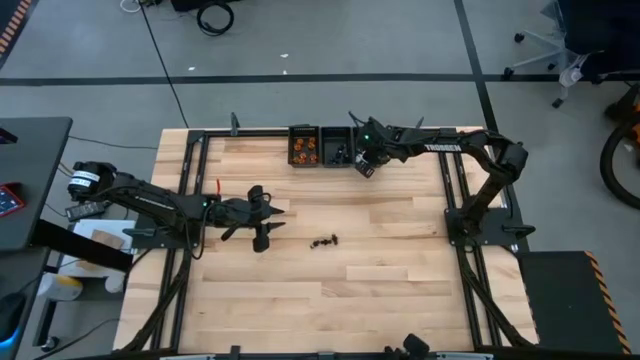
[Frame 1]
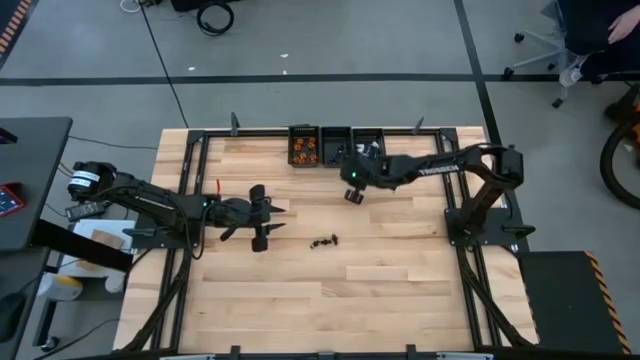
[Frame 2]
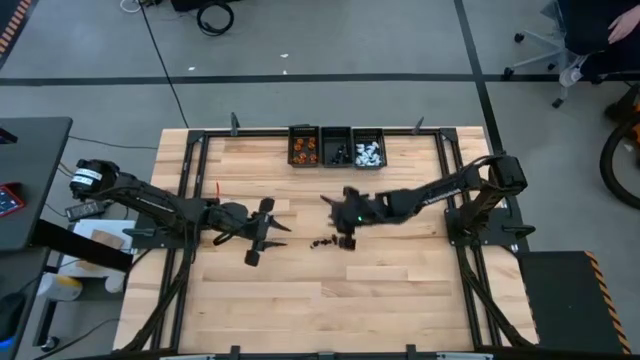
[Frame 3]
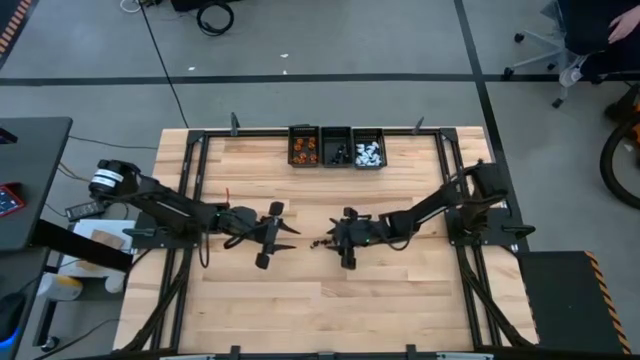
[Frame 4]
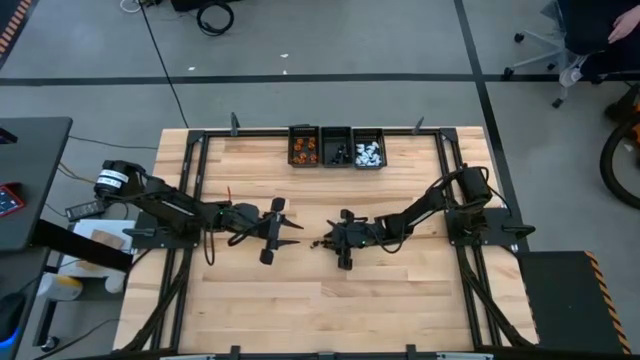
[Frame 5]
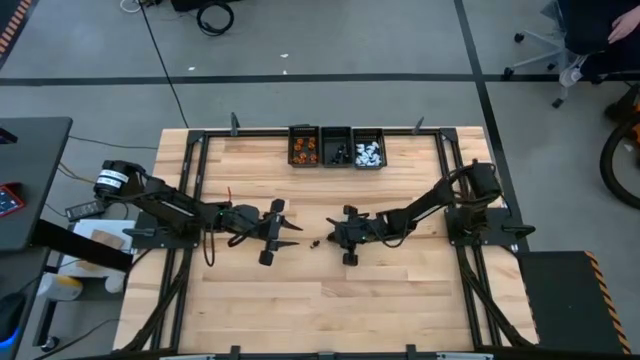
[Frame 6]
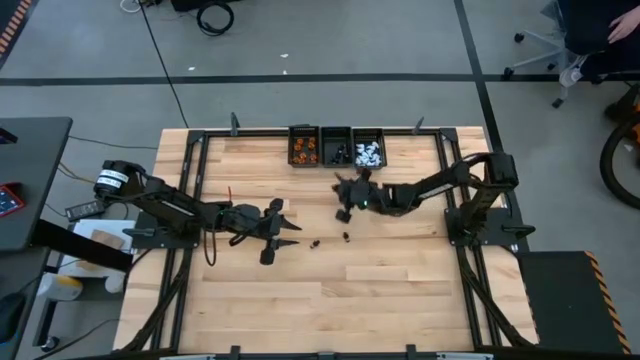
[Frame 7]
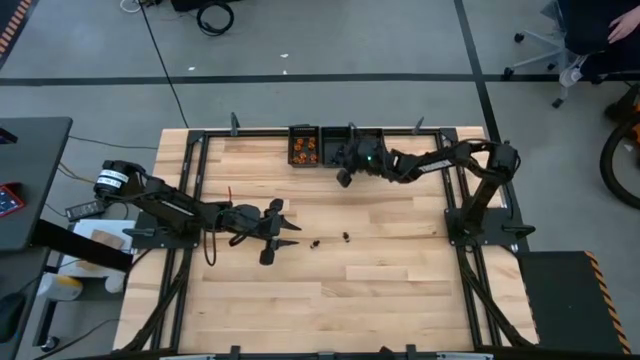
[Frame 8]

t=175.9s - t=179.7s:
Task: Sort game pieces by color
Put the black game piece into the center black basket

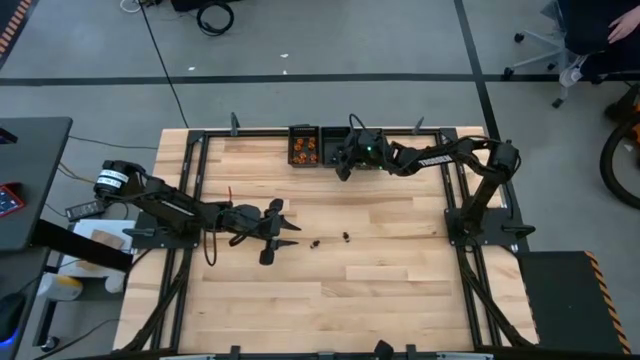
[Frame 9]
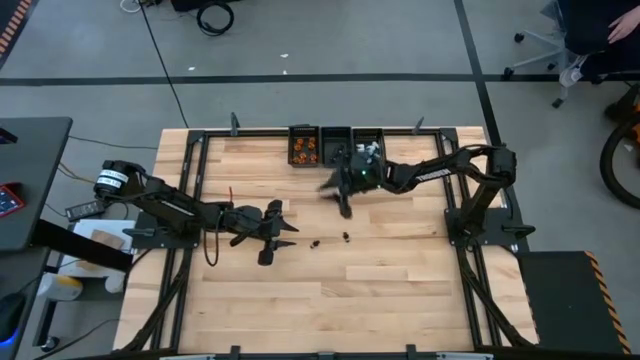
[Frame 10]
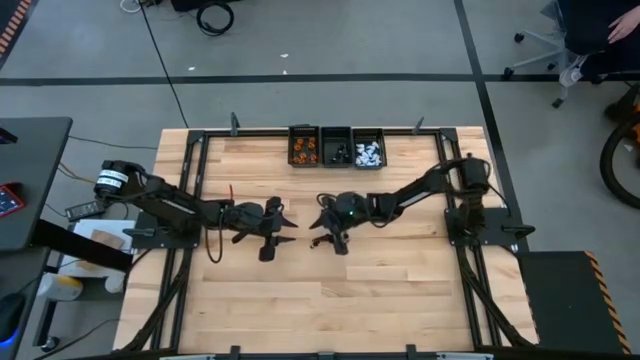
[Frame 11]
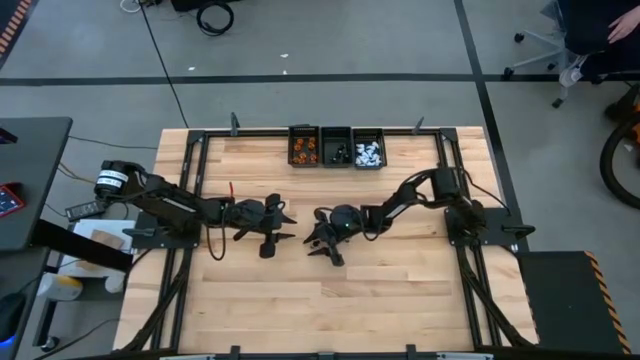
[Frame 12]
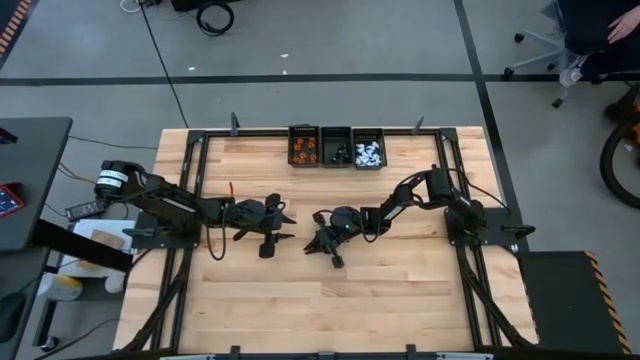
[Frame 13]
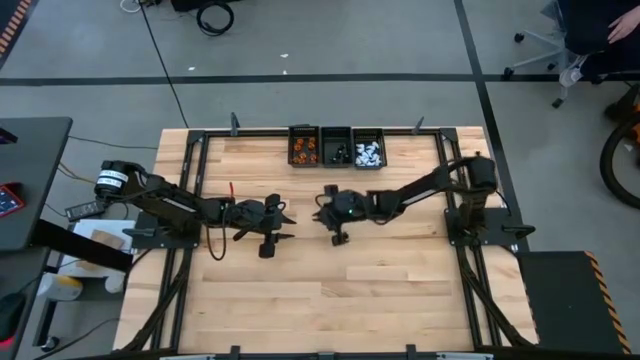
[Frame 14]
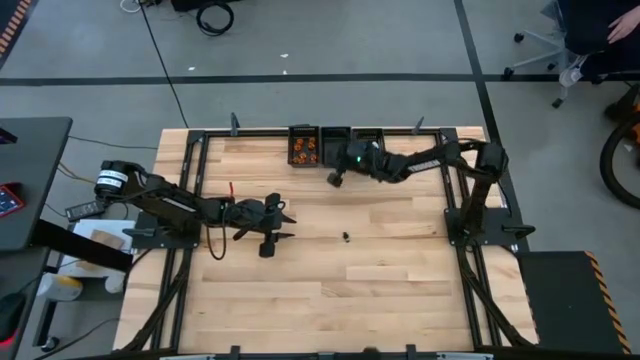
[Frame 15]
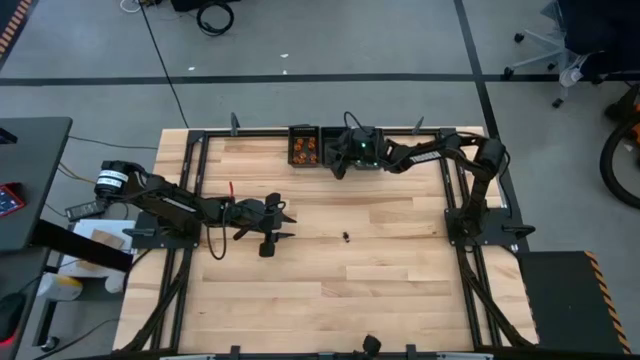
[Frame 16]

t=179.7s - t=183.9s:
Put the black game piece into the center black basket

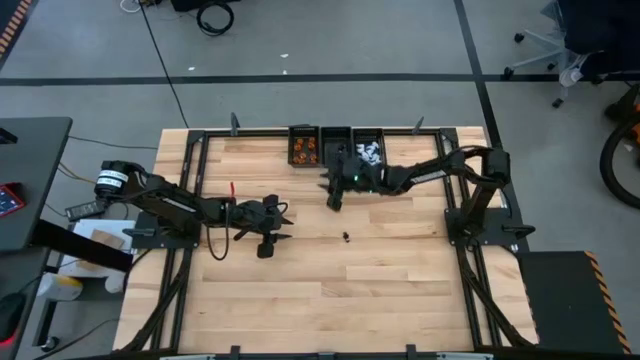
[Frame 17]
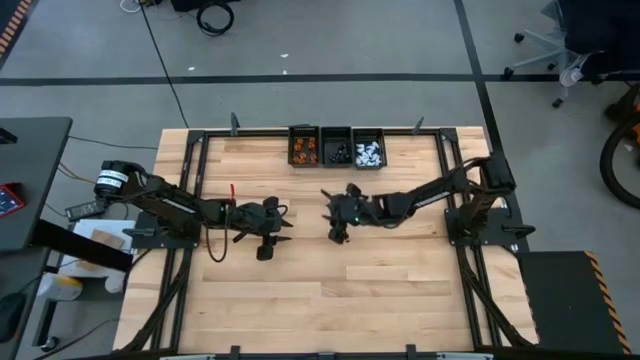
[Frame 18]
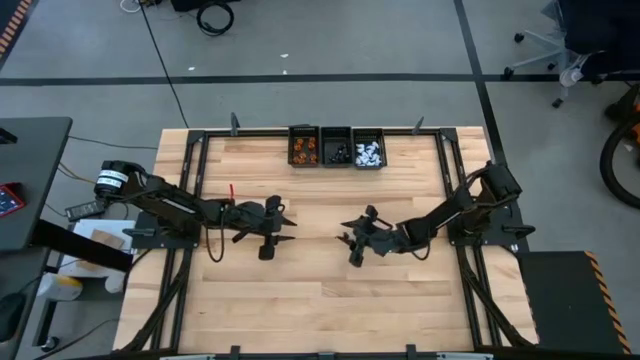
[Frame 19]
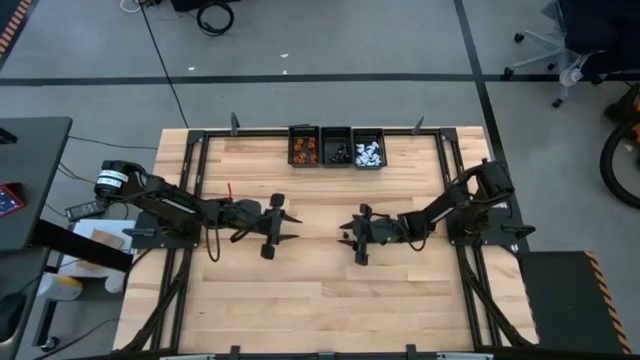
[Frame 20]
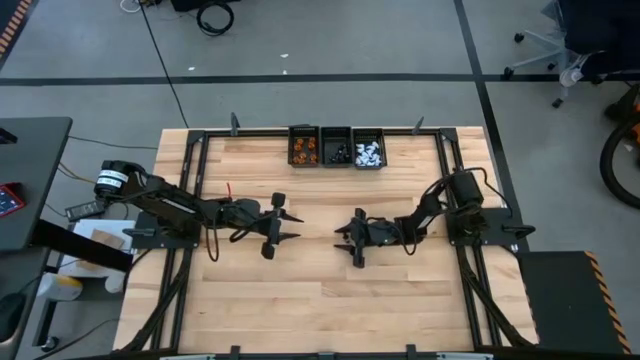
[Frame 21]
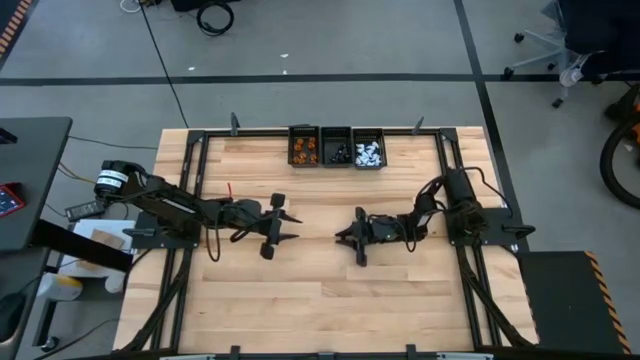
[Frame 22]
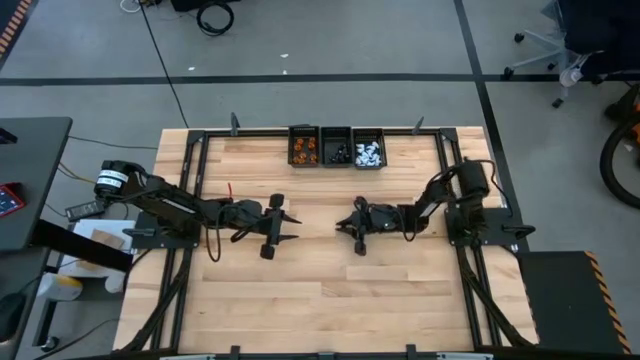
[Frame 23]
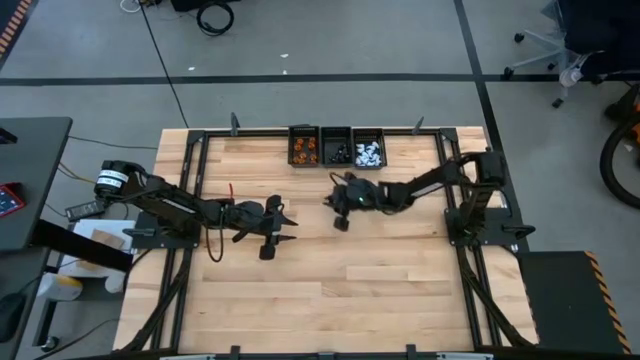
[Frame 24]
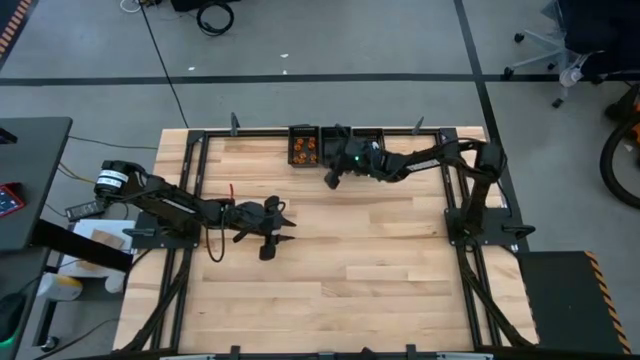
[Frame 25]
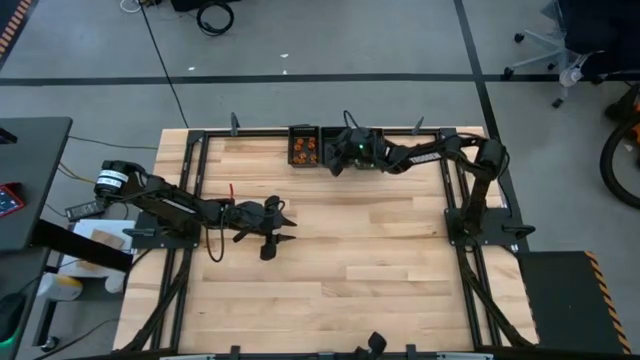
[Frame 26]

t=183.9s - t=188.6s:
Put the black game piece into the center black basket

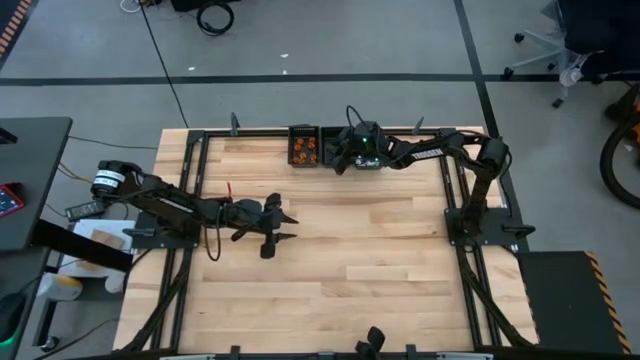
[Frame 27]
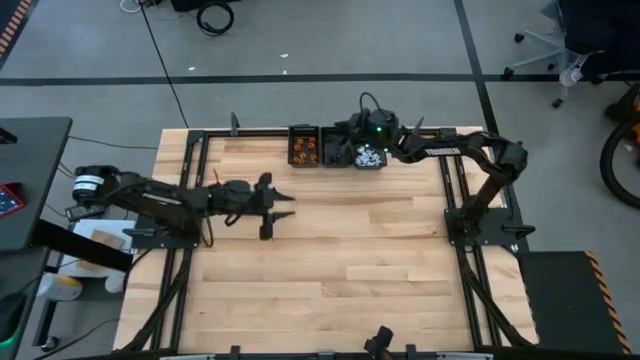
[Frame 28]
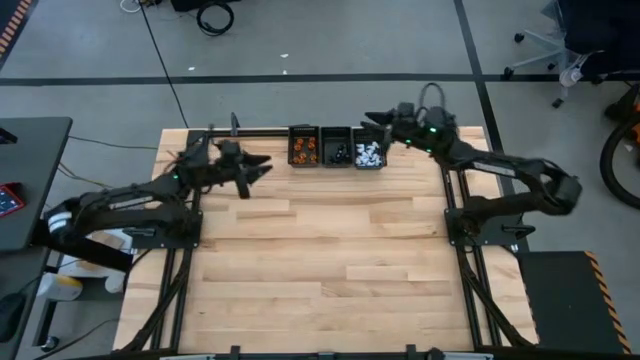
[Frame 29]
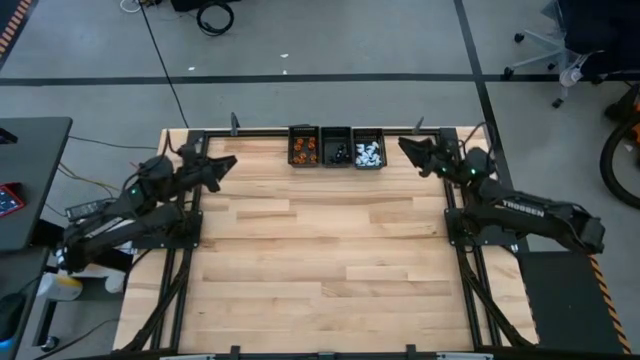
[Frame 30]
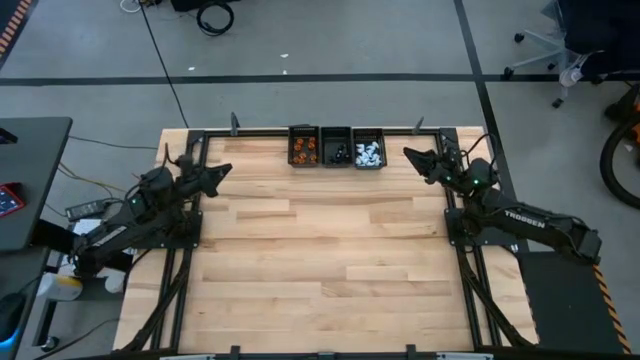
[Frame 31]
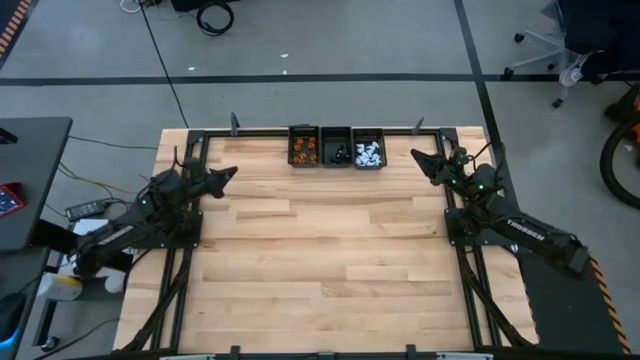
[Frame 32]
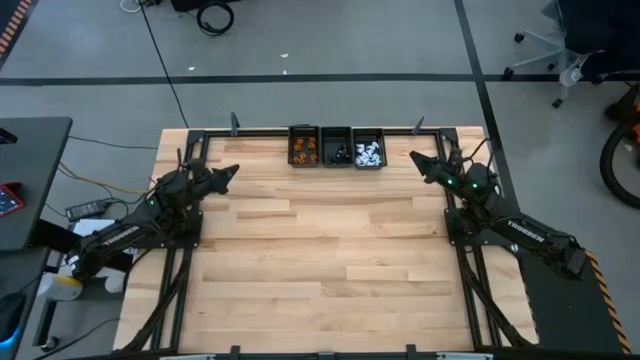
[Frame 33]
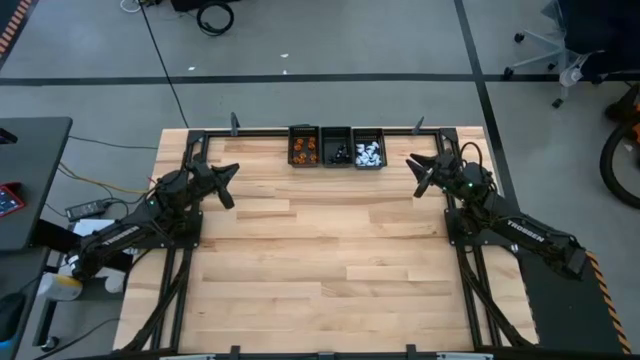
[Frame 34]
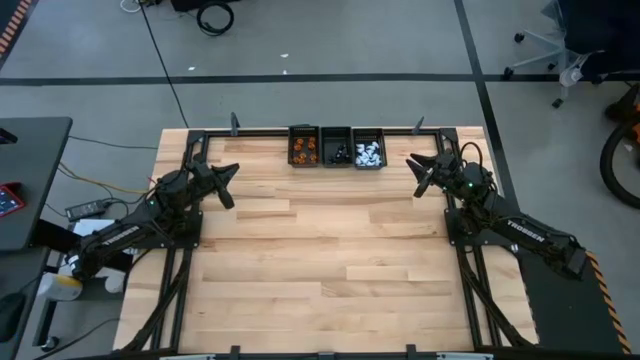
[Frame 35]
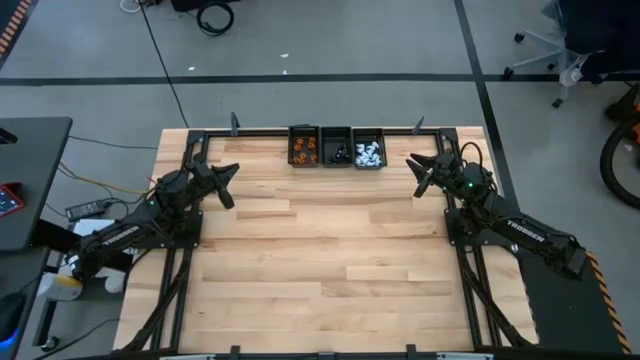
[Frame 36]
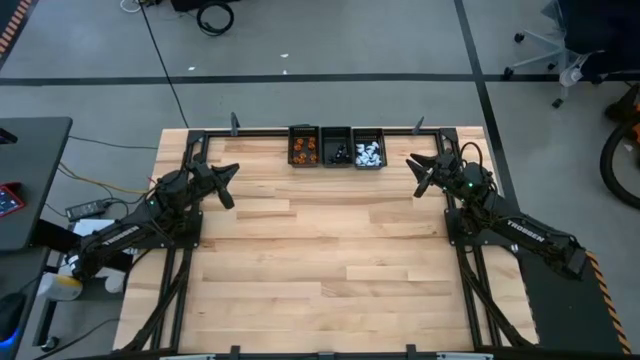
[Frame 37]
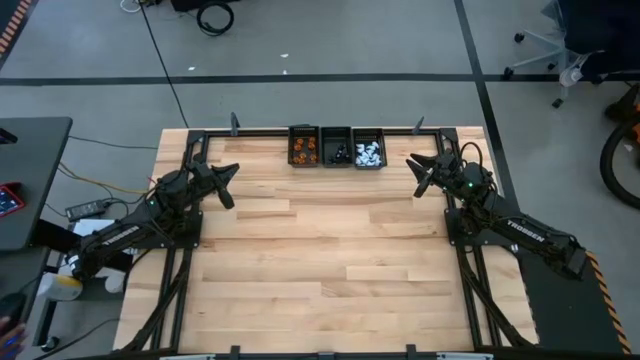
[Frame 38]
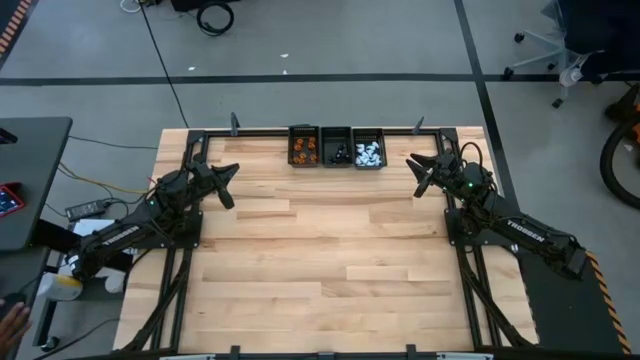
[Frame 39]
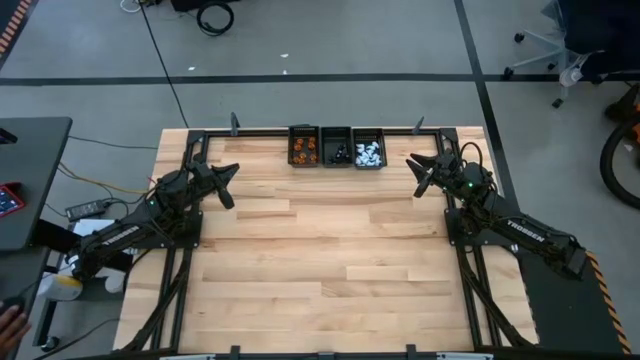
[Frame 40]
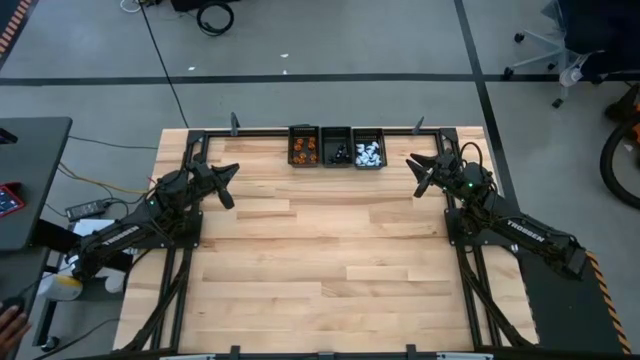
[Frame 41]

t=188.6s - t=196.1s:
Return to Home Position
